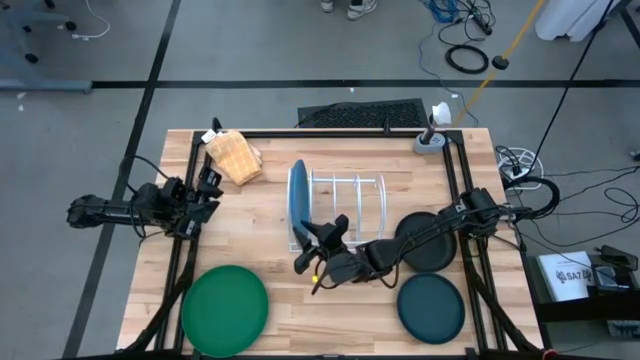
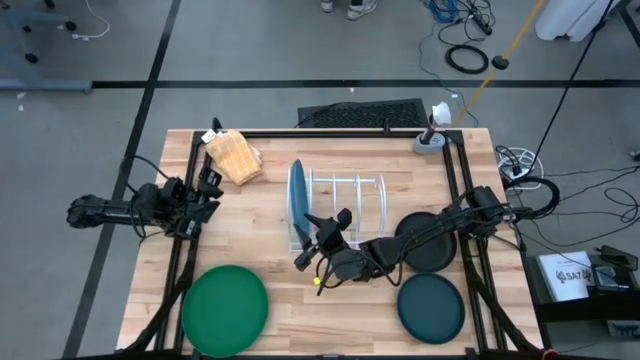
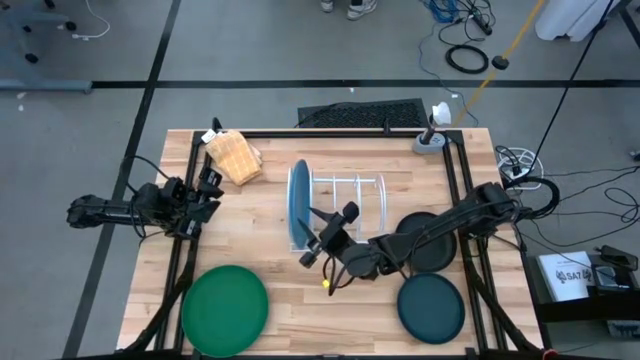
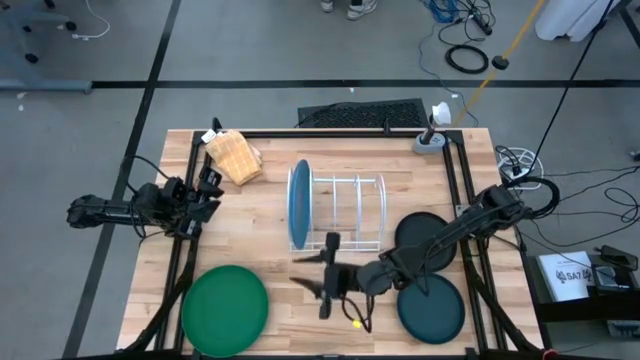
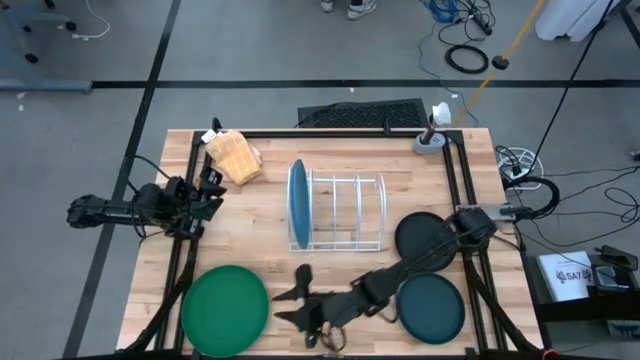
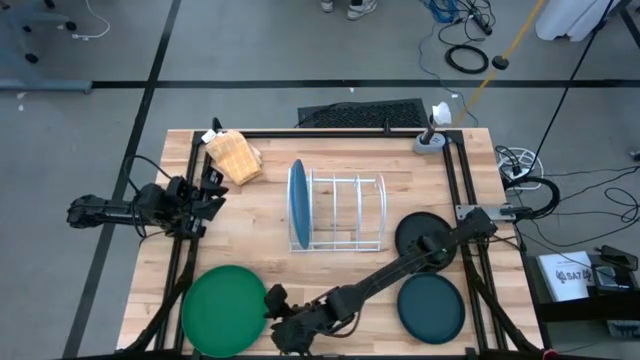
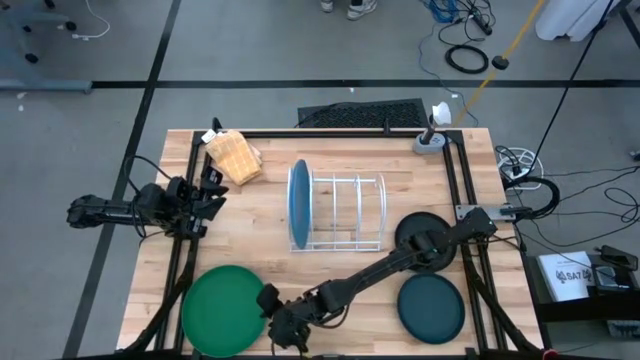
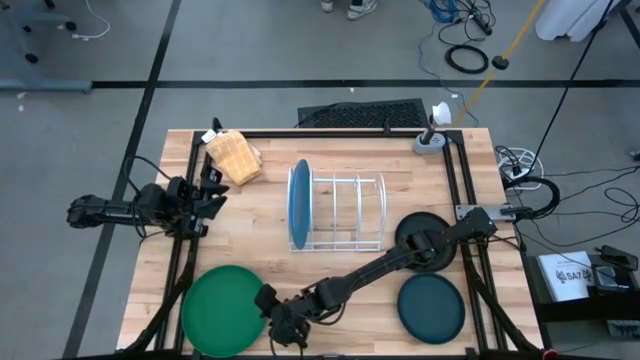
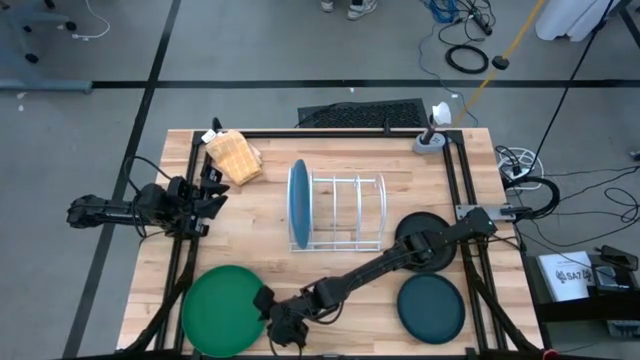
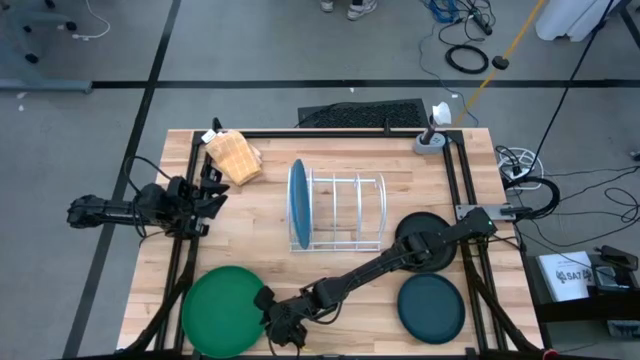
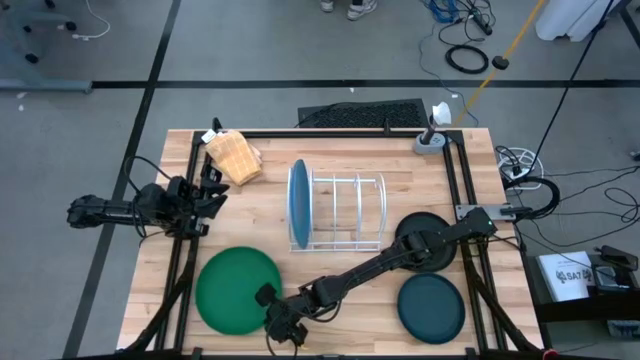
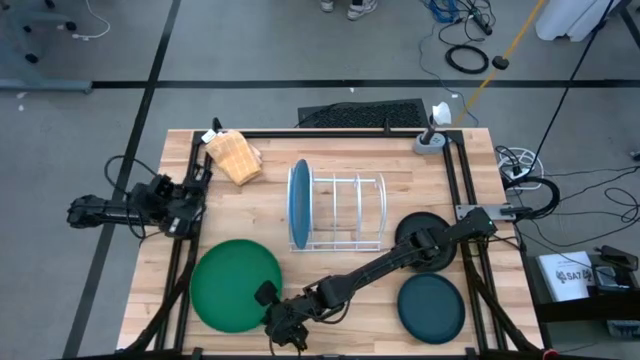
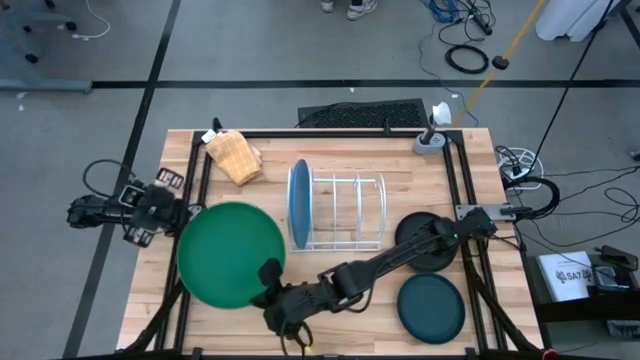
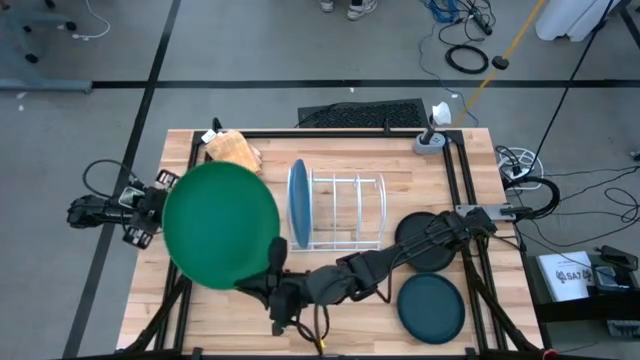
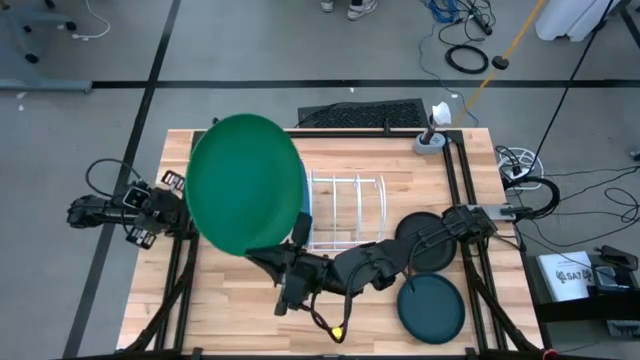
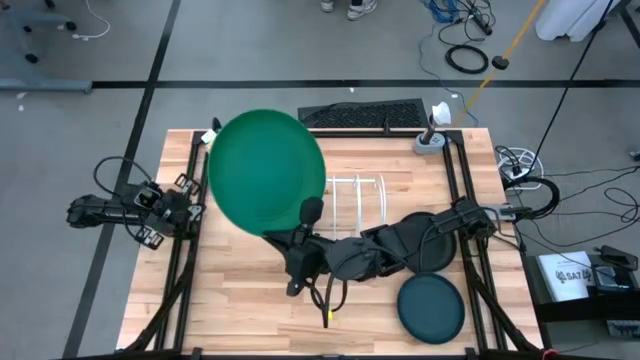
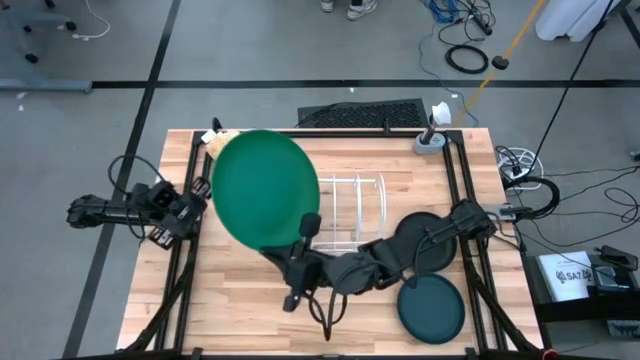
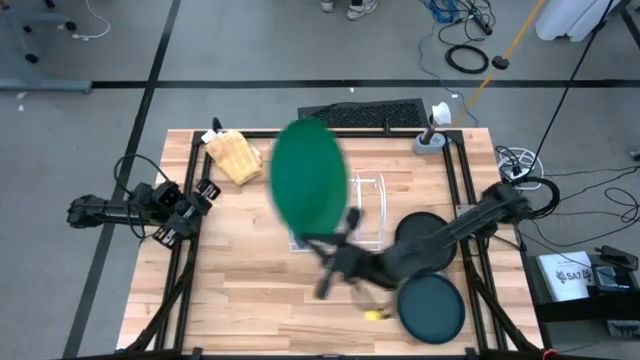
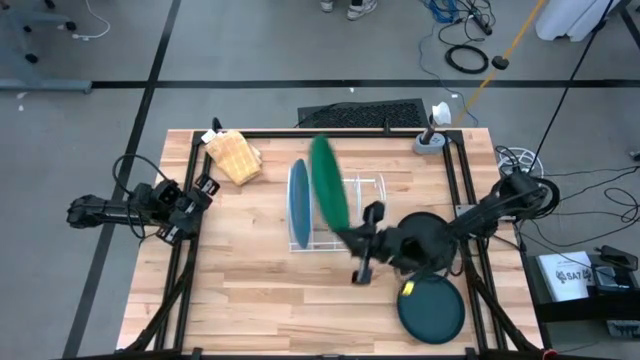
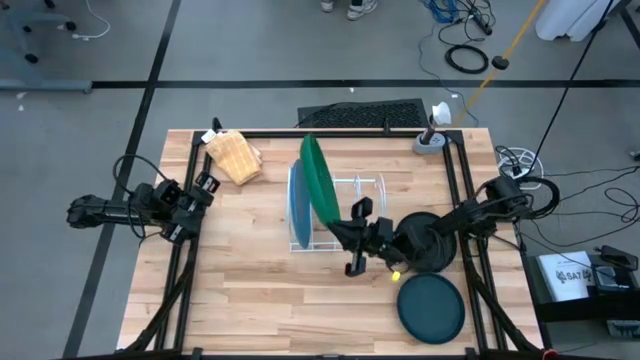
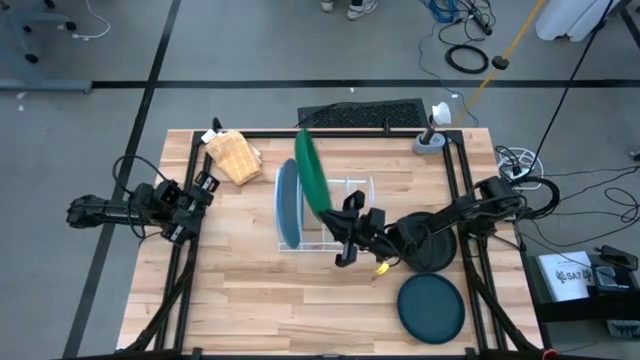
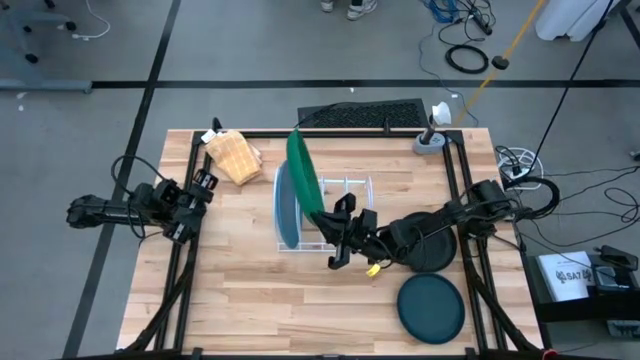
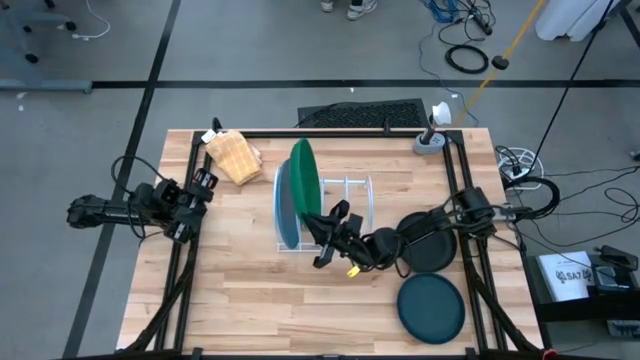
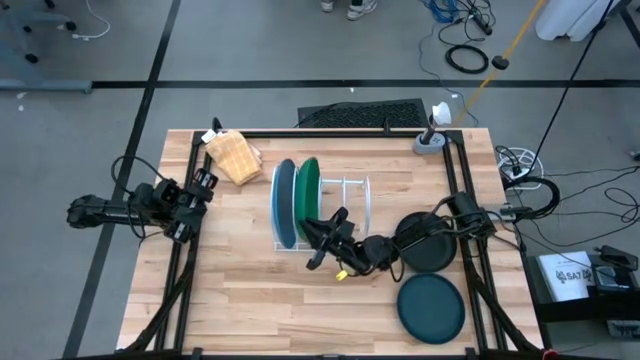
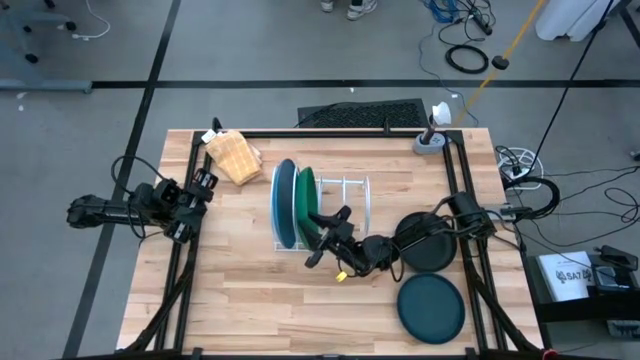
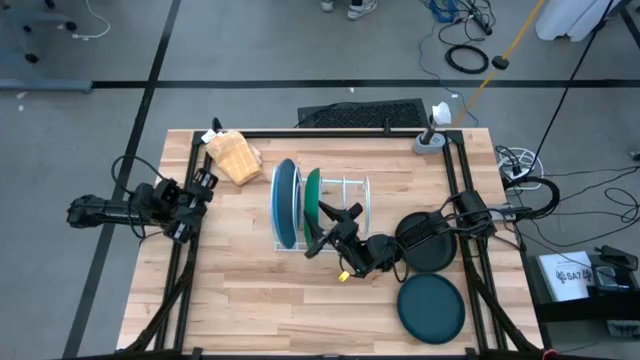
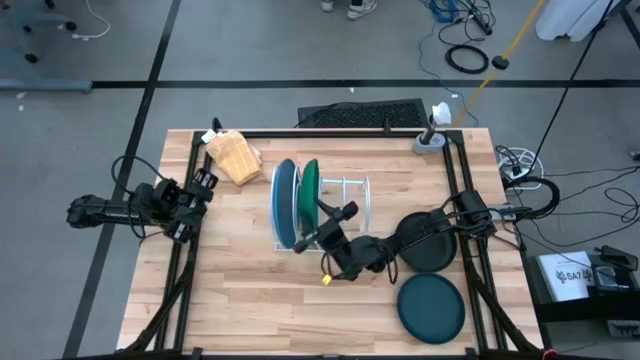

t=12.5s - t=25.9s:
Task: Sort dishes
Put the green plate in the dishwasher rack

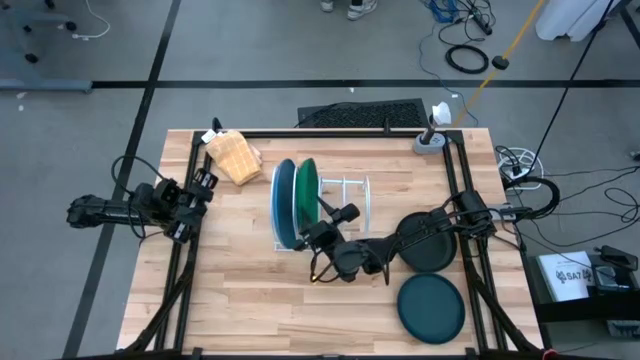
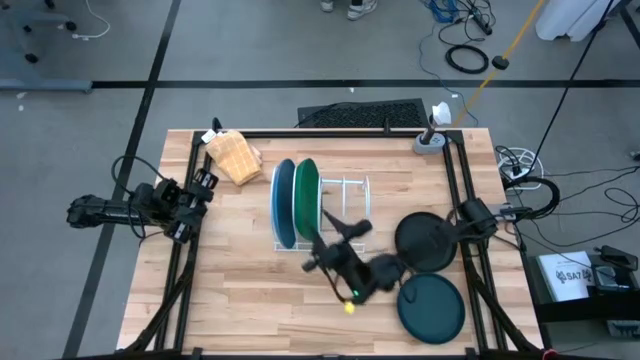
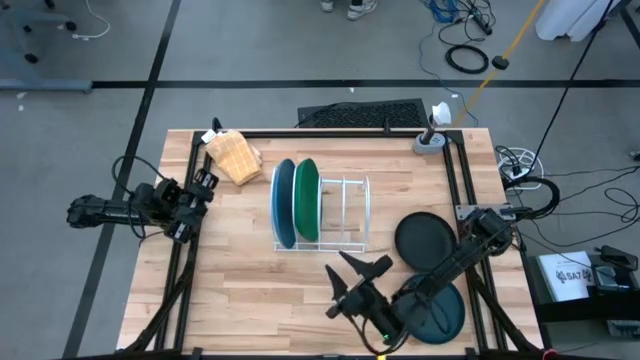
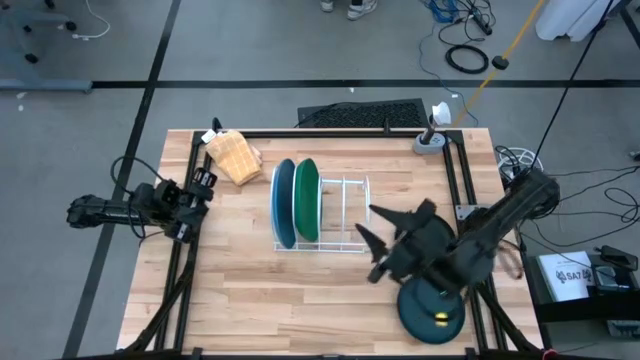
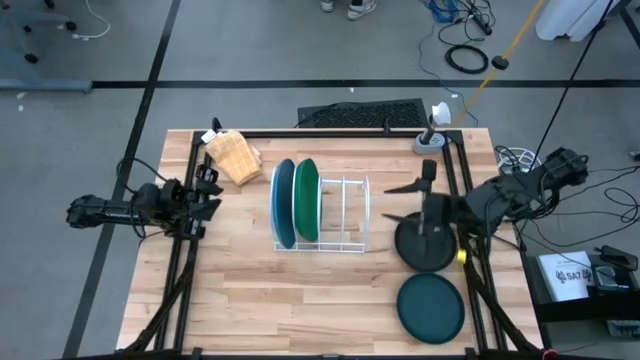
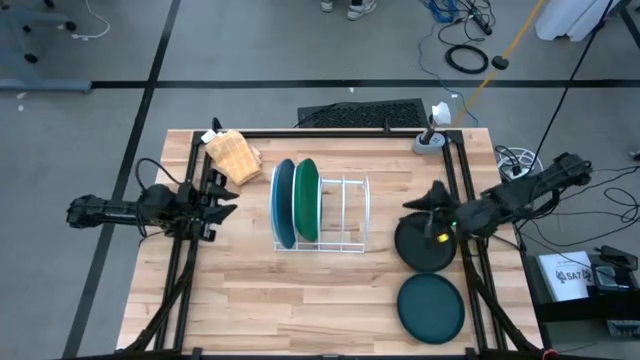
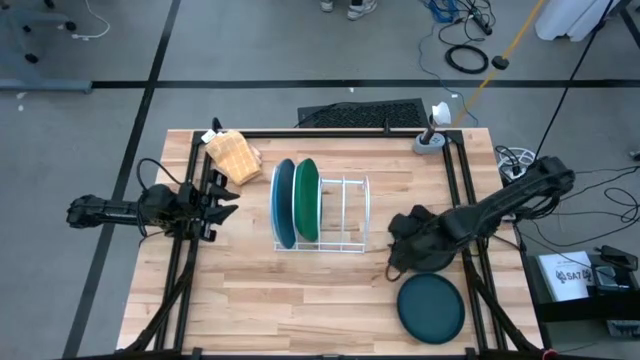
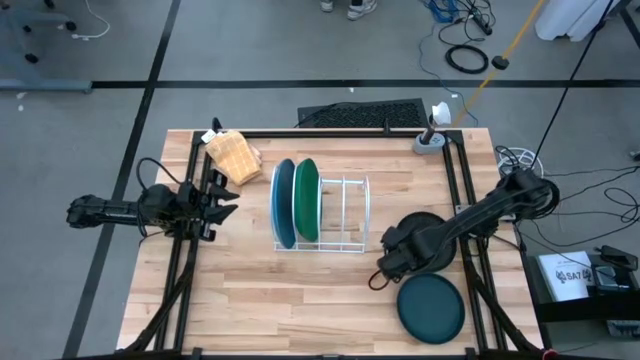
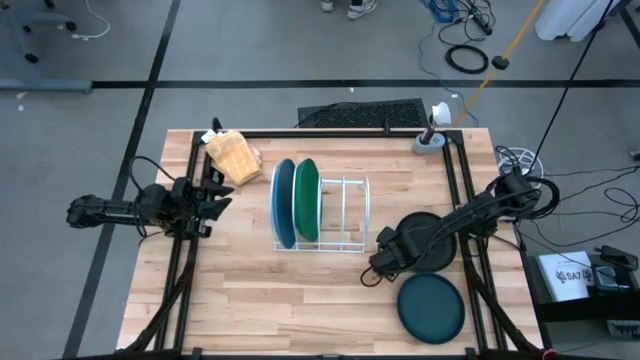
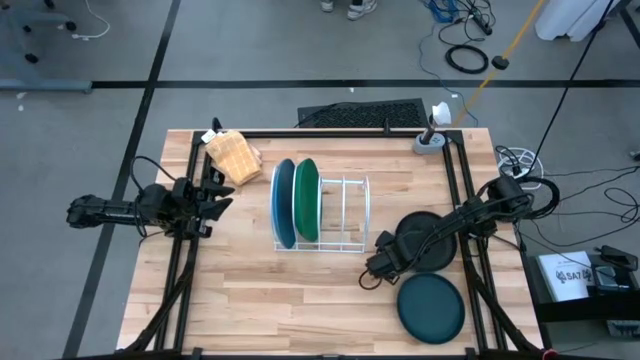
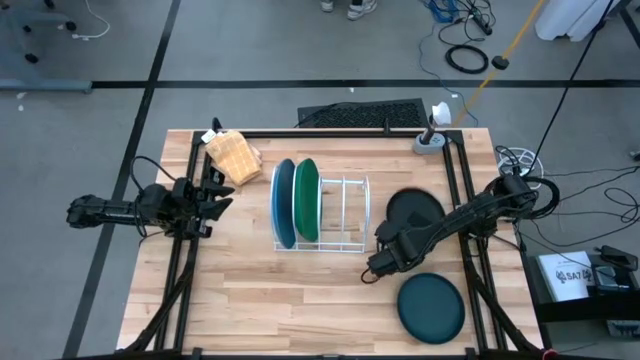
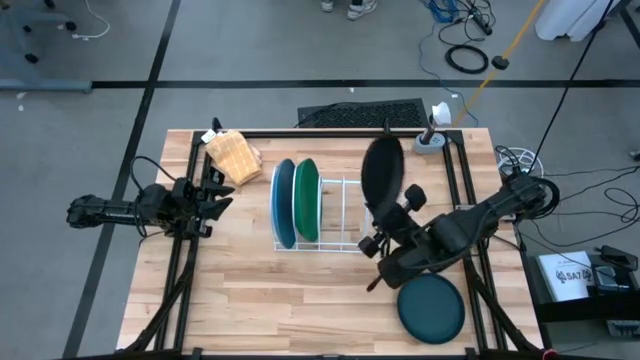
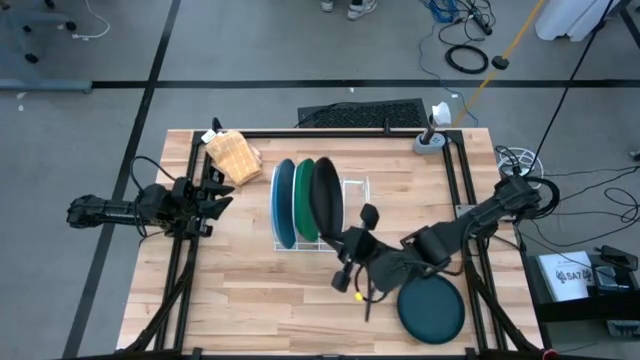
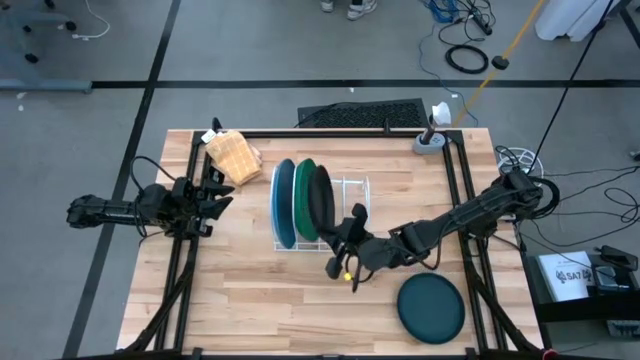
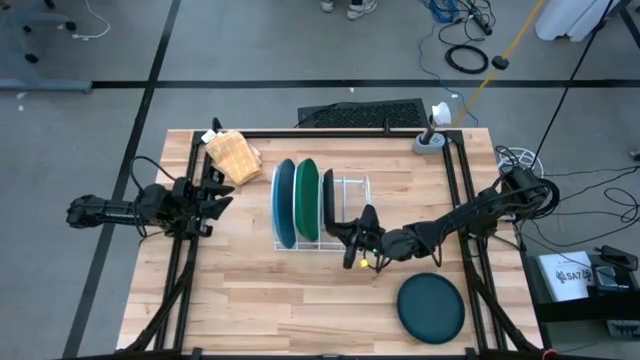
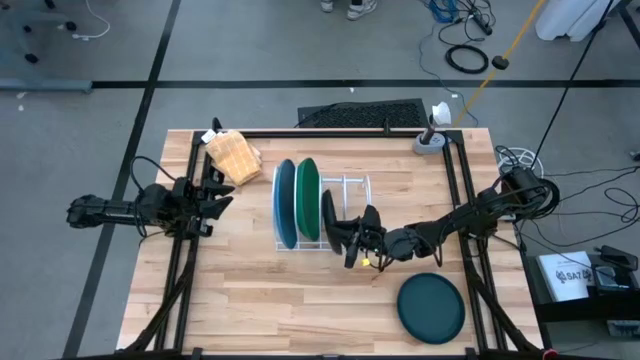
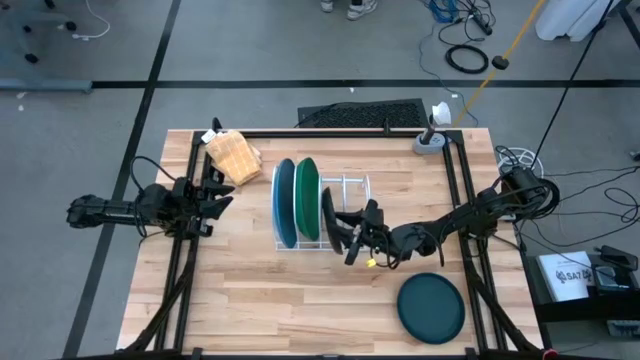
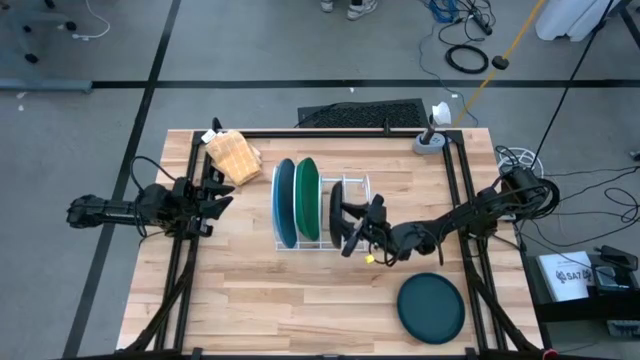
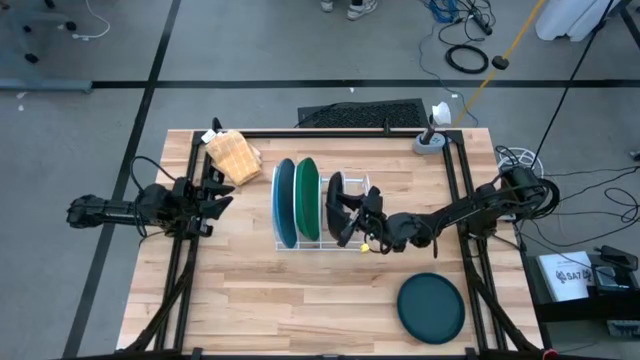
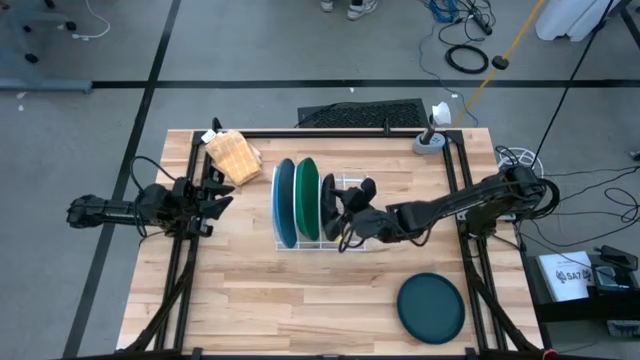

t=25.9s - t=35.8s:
Put the black plate in the dishwasher rack
